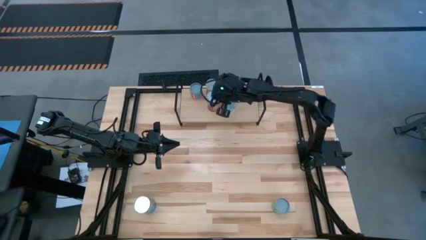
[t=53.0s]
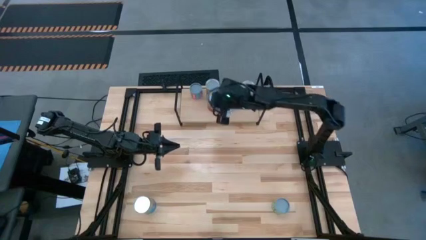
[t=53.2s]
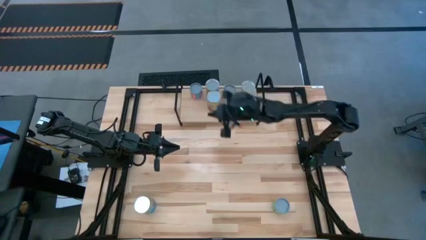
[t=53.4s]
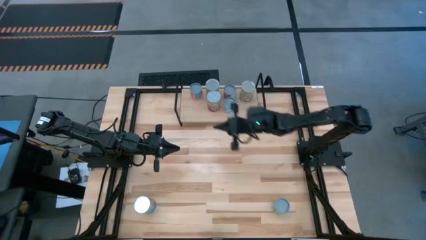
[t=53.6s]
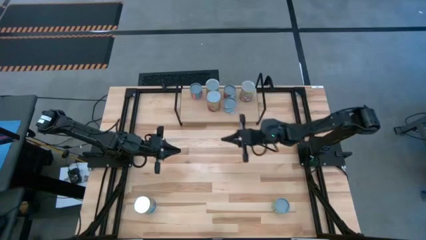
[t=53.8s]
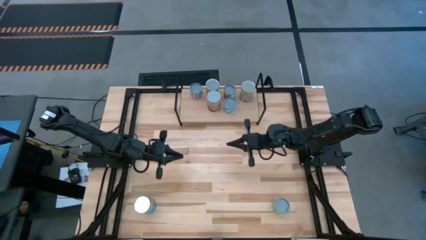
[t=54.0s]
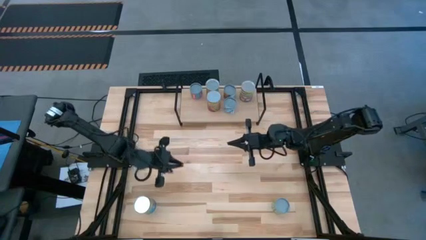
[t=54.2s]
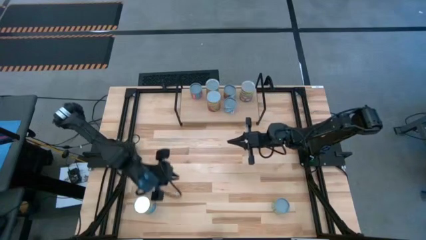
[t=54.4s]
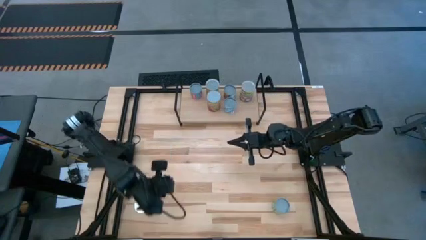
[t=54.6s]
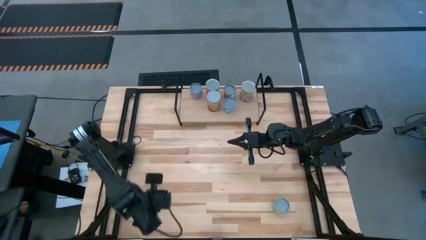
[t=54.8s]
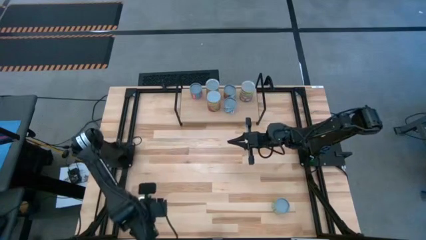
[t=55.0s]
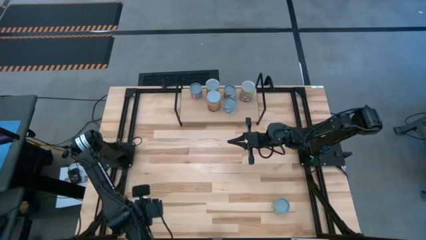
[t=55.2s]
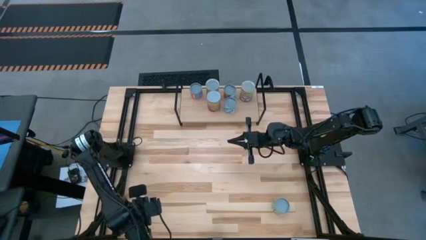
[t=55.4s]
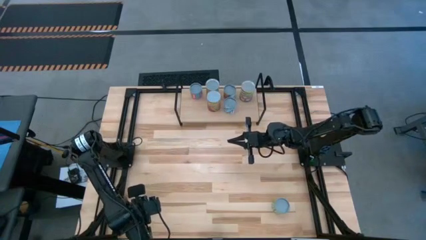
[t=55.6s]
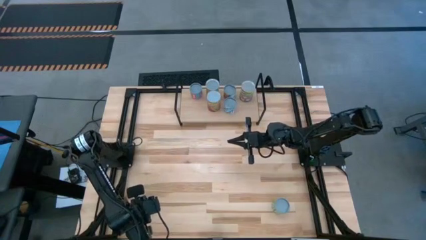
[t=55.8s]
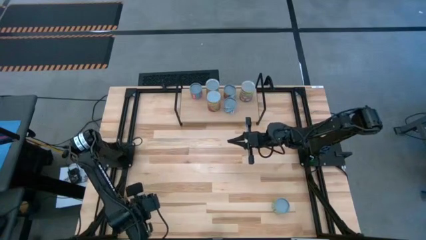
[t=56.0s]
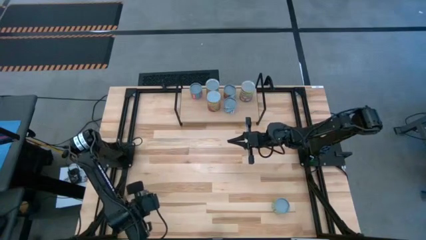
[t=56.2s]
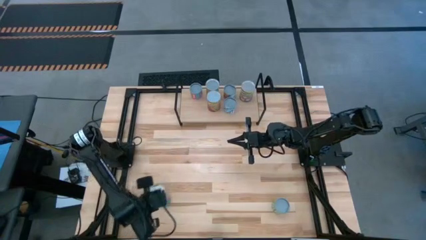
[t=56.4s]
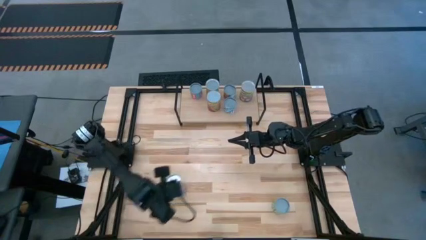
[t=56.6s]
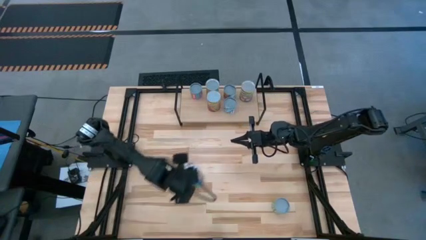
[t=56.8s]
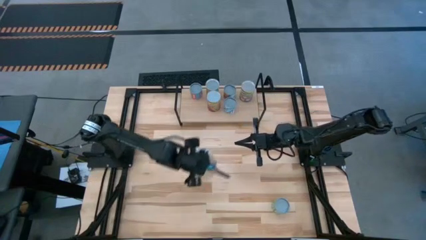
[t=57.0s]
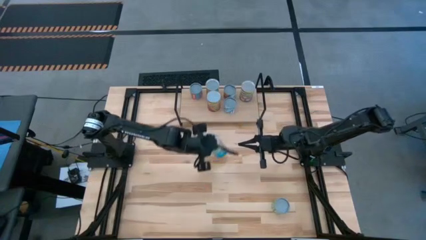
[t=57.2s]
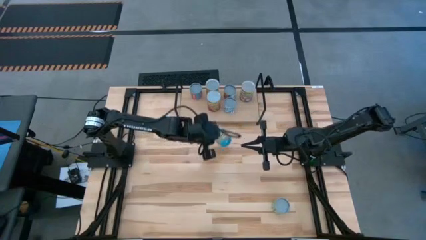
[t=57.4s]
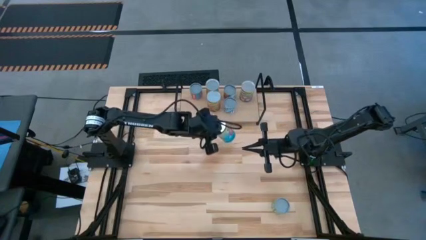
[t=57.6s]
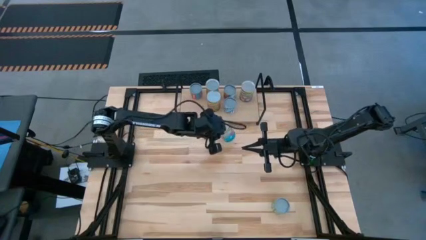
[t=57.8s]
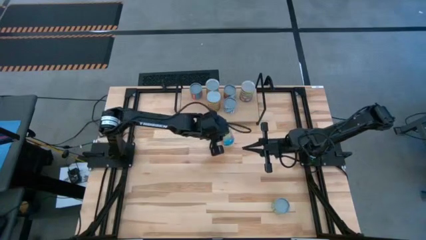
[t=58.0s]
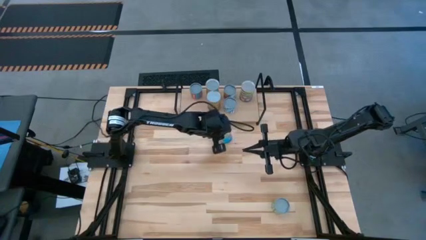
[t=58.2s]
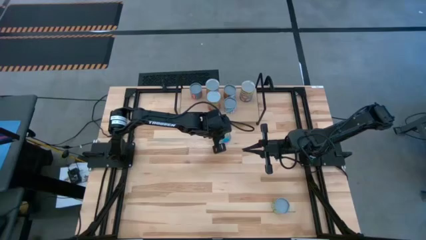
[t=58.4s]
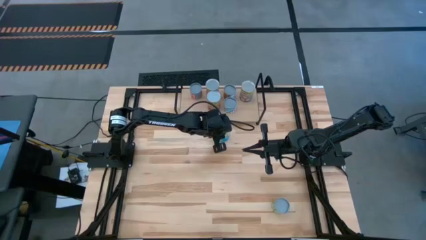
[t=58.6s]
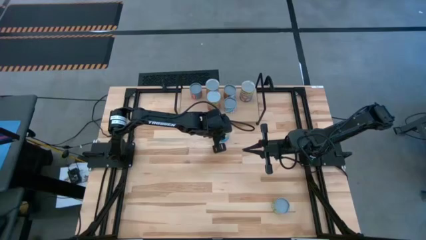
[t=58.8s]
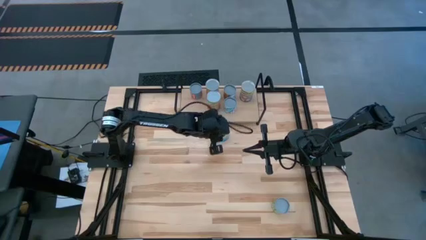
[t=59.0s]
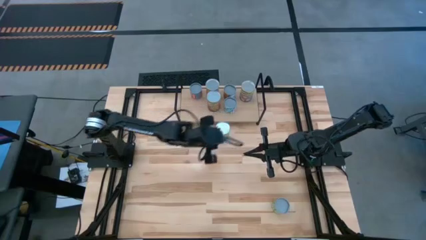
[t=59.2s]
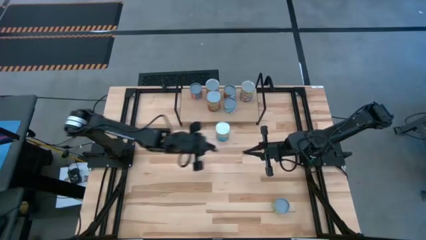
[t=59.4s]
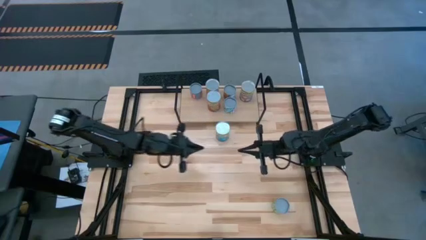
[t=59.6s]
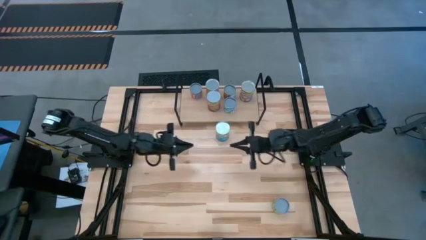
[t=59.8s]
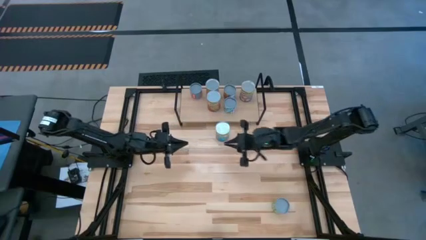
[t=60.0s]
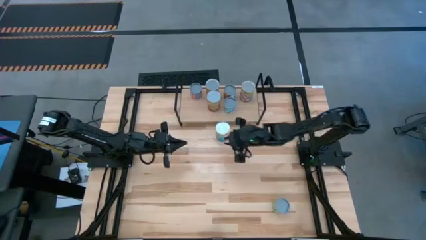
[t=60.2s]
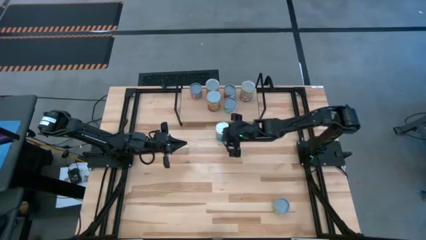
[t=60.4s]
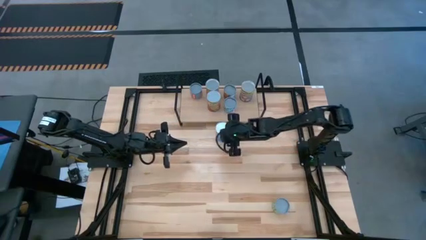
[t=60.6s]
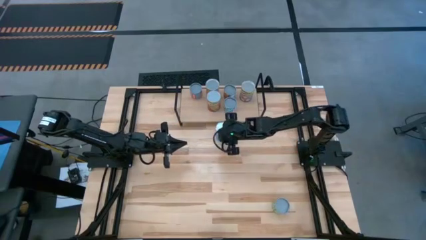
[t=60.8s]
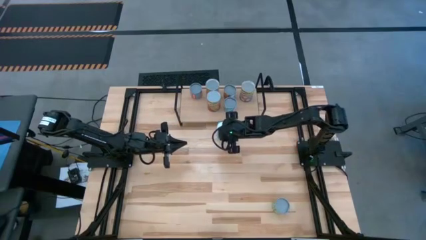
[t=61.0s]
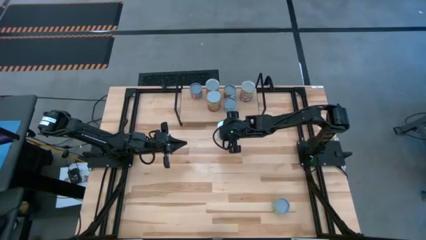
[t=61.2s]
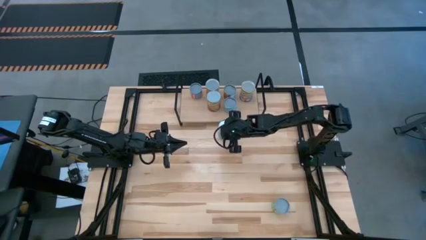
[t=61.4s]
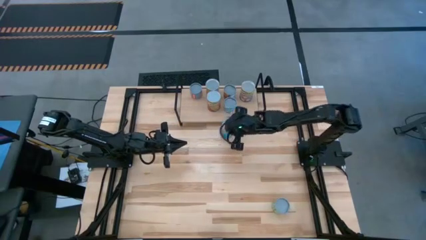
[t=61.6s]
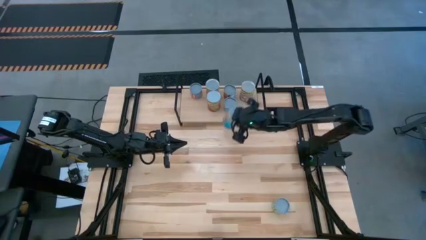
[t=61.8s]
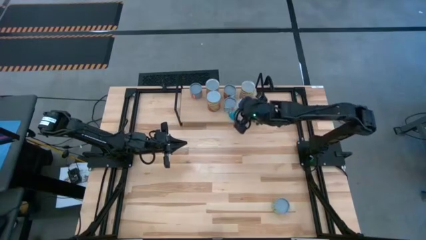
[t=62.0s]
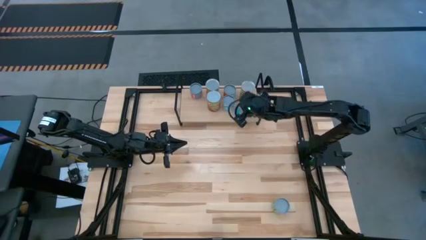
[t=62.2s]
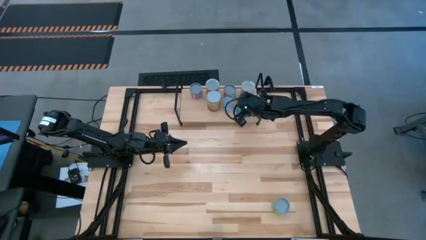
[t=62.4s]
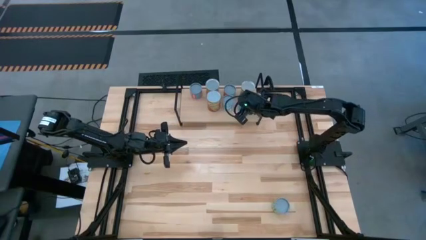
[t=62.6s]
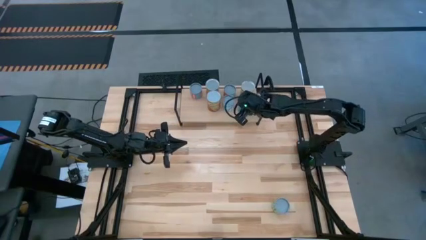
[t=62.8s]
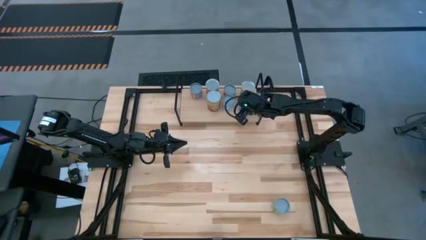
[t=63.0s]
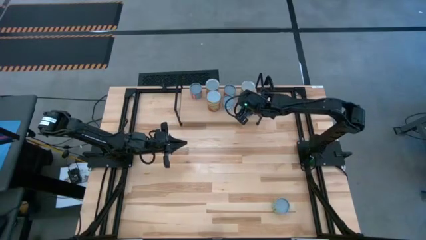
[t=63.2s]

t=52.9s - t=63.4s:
Task: Pick and place cans onto a shelf
Put the light blue can on the shelf aligned with the other blue can
